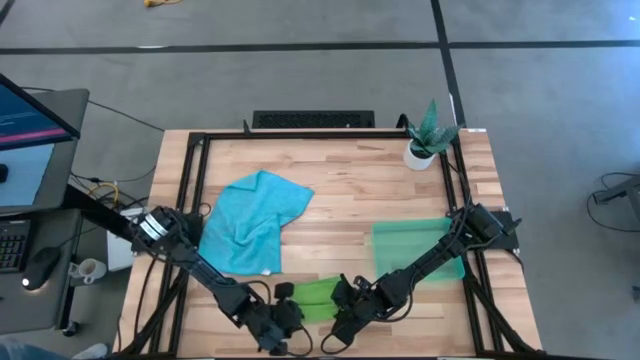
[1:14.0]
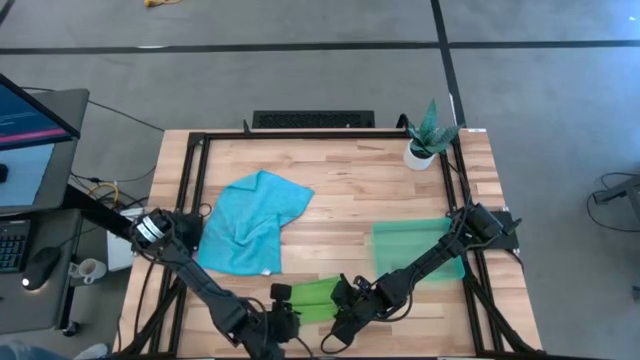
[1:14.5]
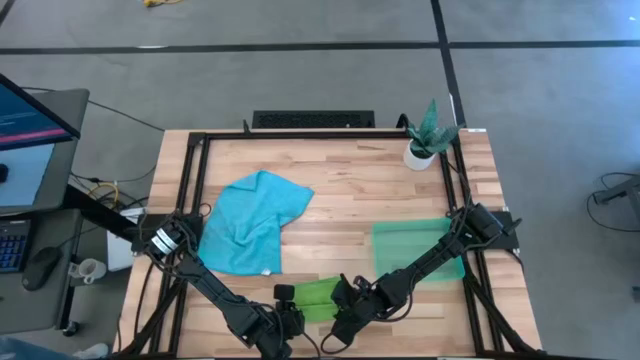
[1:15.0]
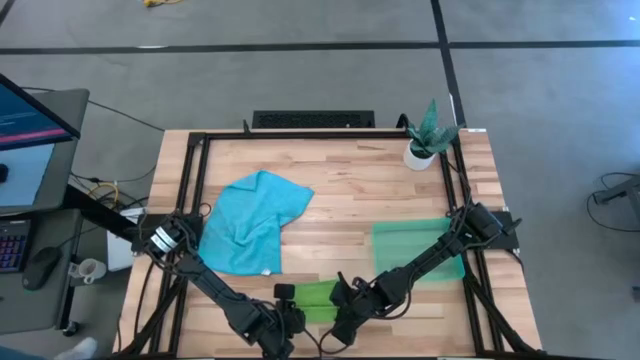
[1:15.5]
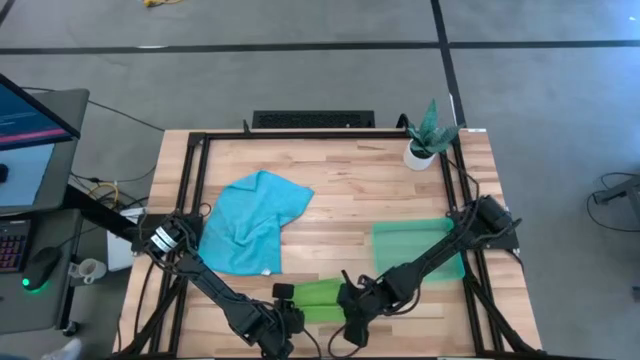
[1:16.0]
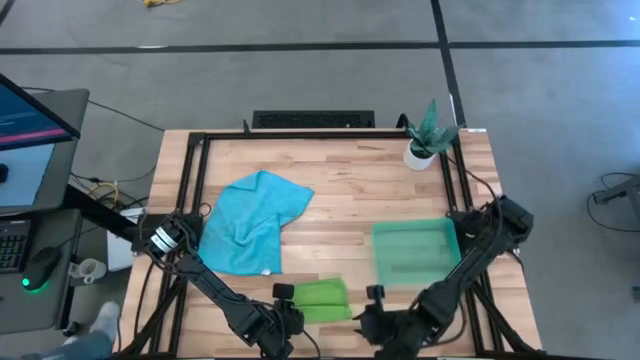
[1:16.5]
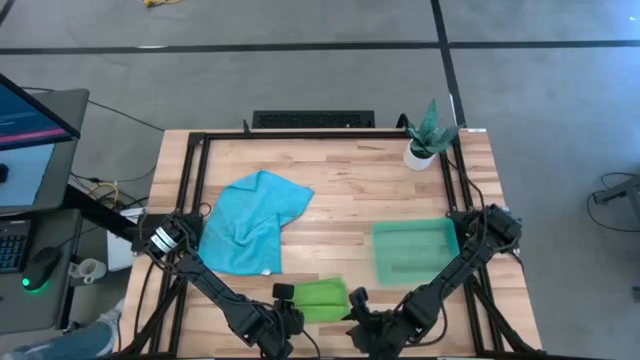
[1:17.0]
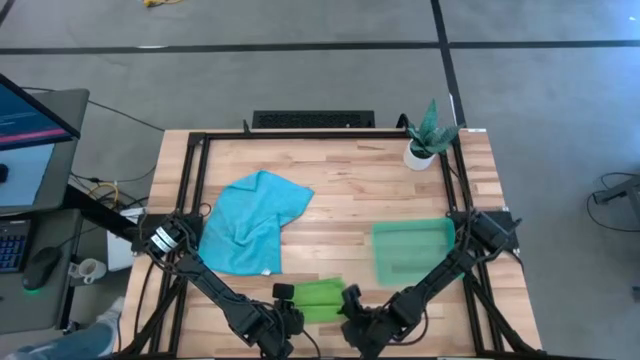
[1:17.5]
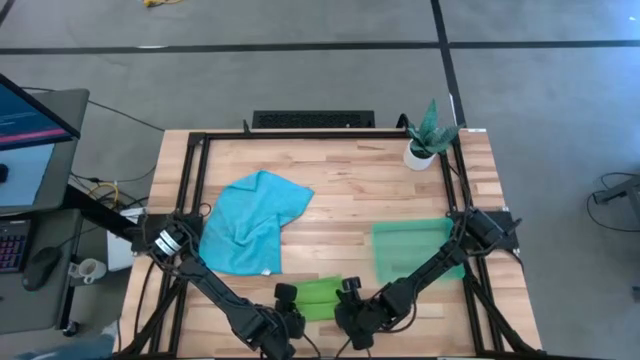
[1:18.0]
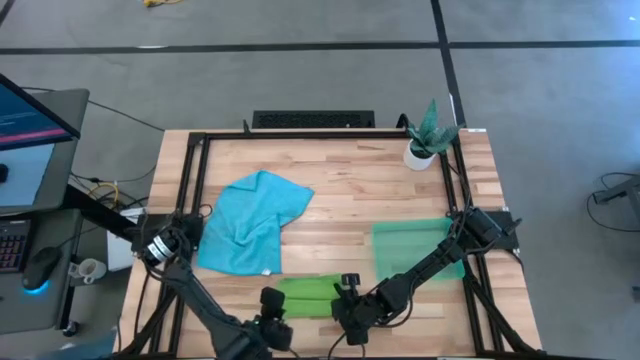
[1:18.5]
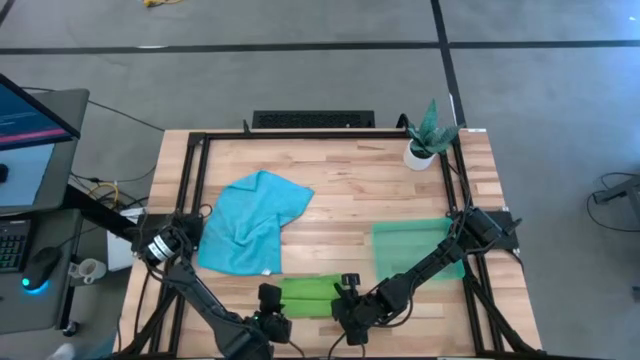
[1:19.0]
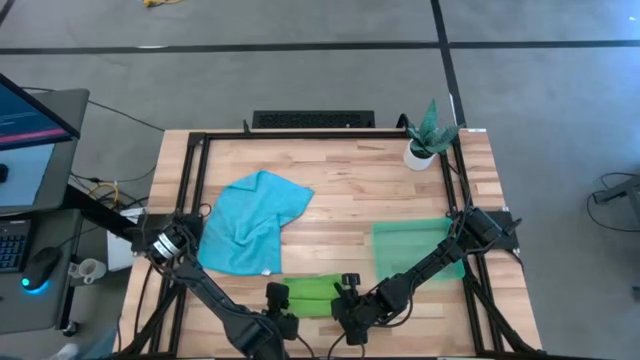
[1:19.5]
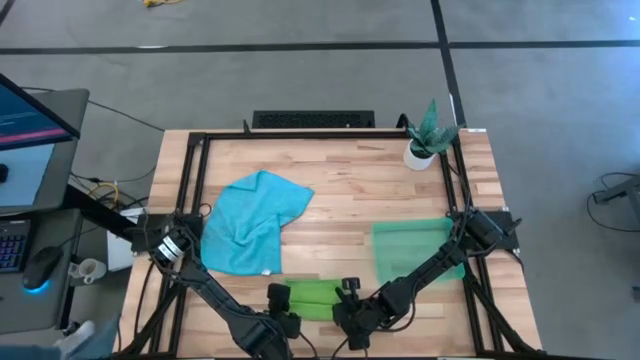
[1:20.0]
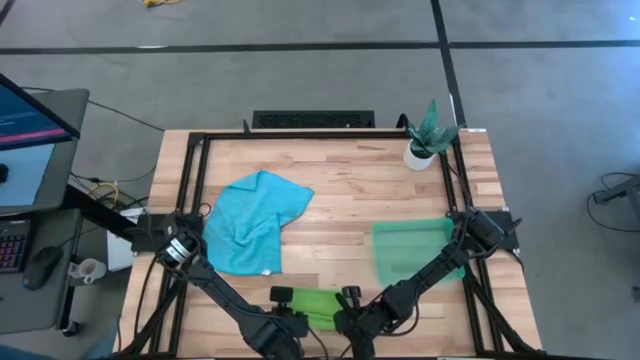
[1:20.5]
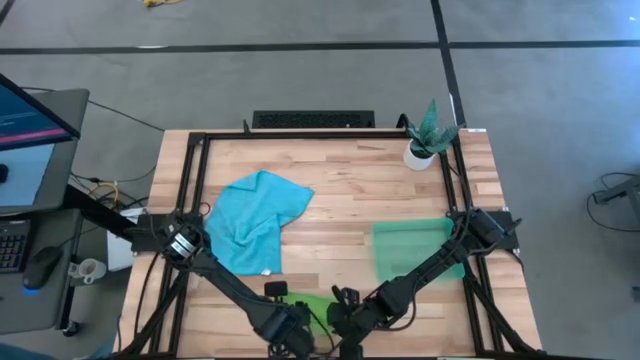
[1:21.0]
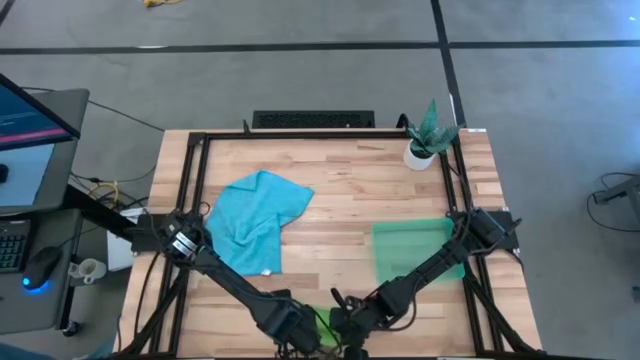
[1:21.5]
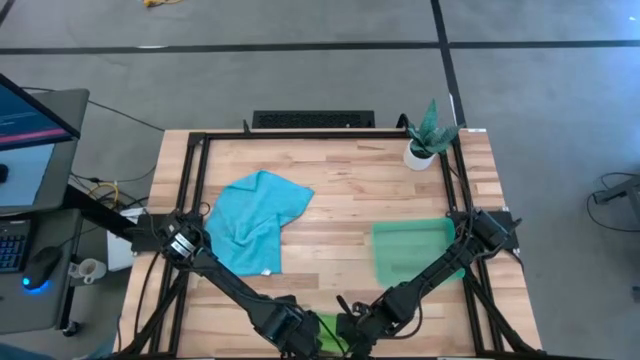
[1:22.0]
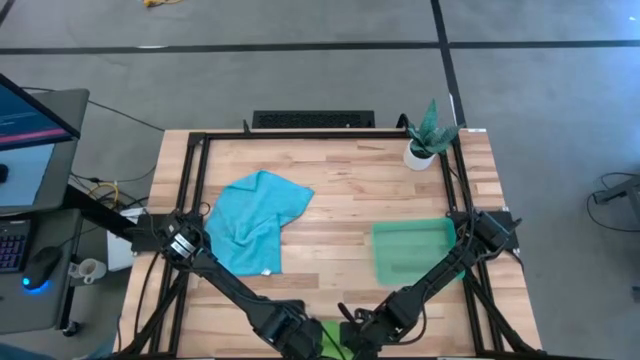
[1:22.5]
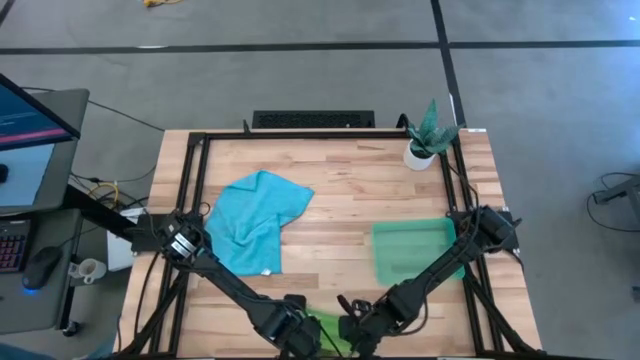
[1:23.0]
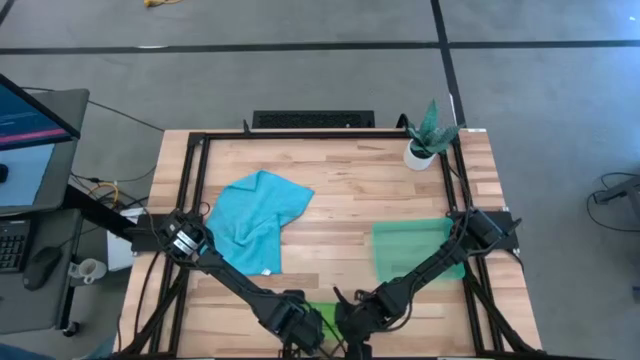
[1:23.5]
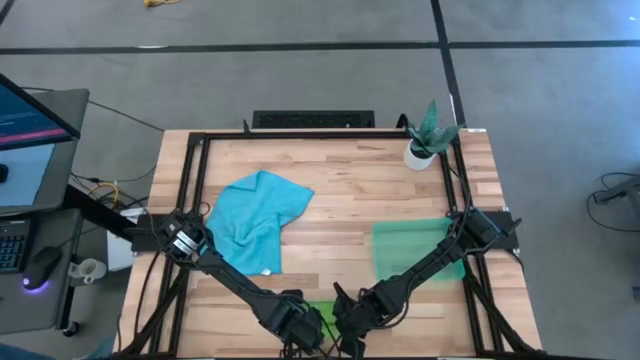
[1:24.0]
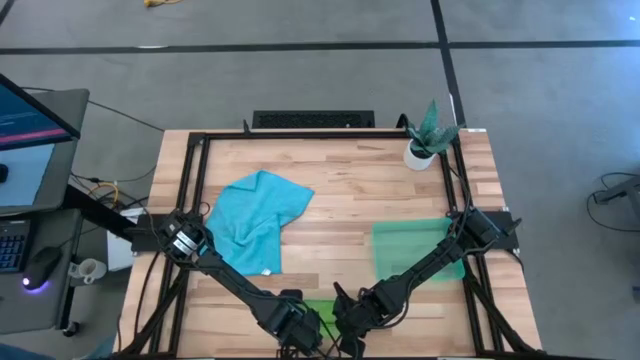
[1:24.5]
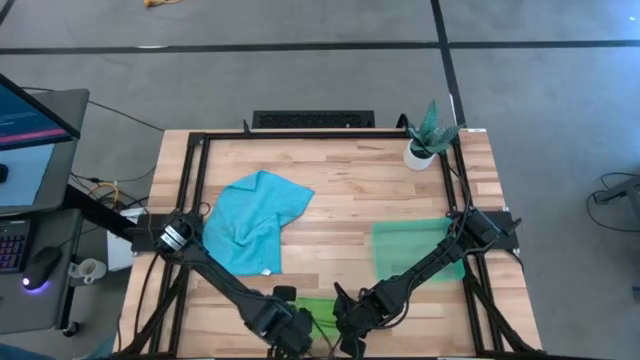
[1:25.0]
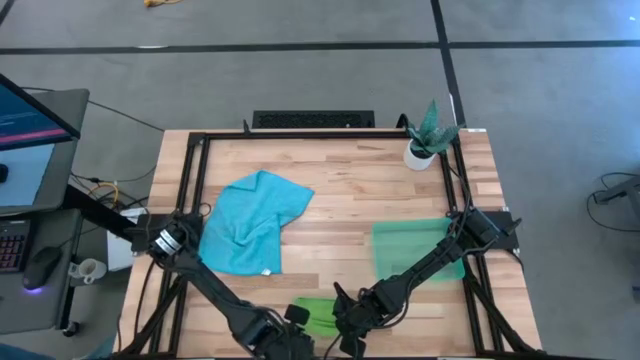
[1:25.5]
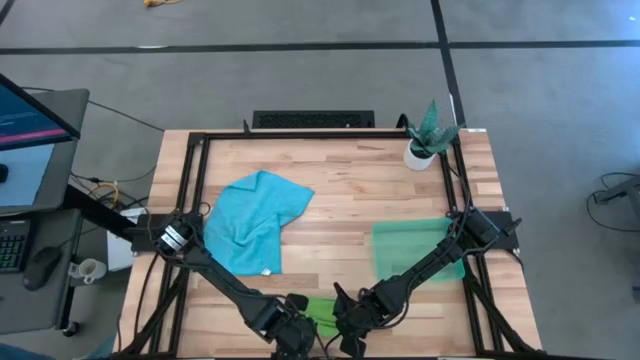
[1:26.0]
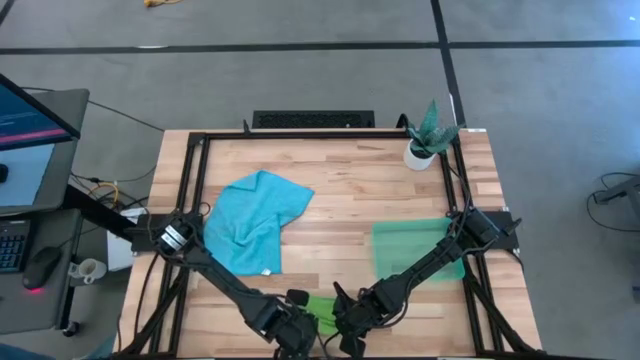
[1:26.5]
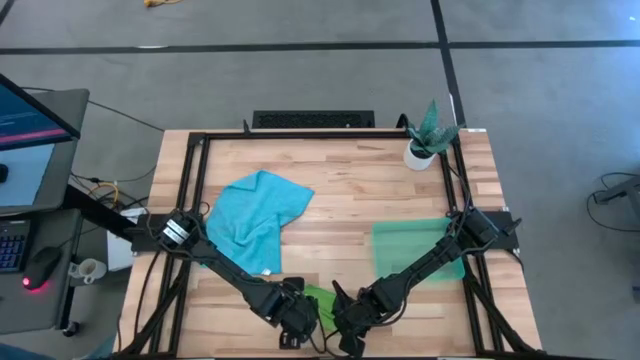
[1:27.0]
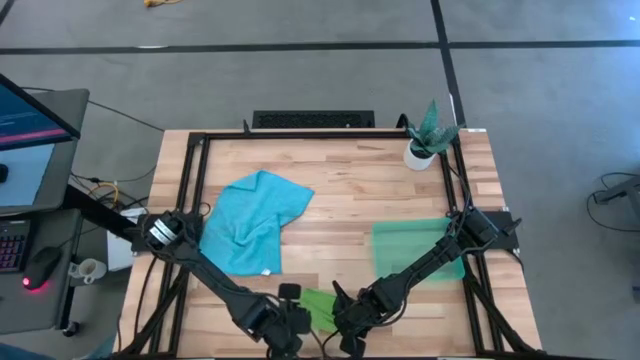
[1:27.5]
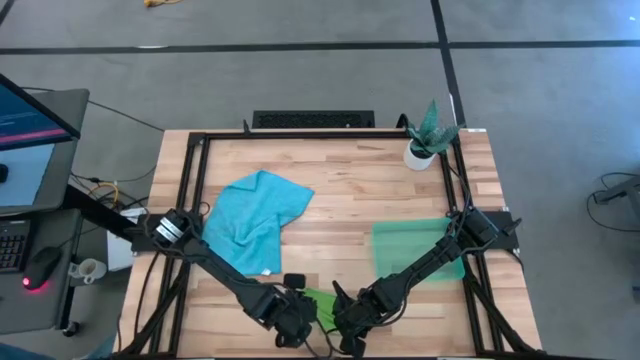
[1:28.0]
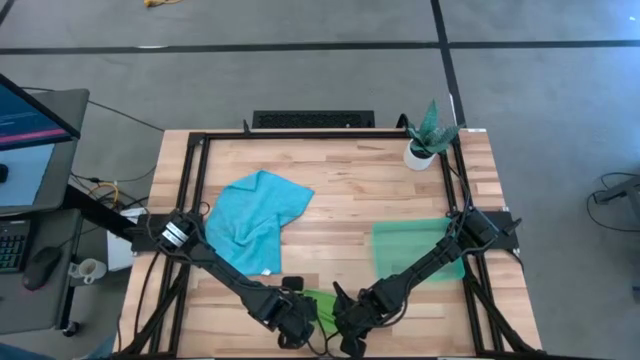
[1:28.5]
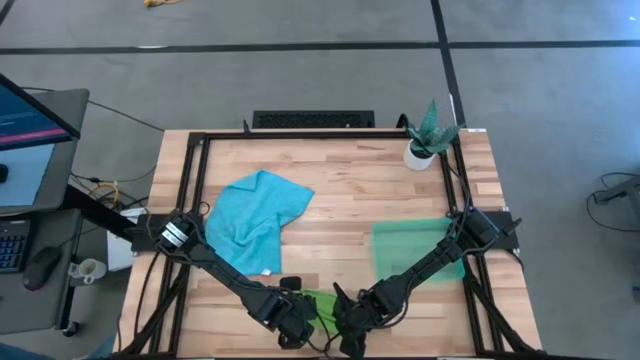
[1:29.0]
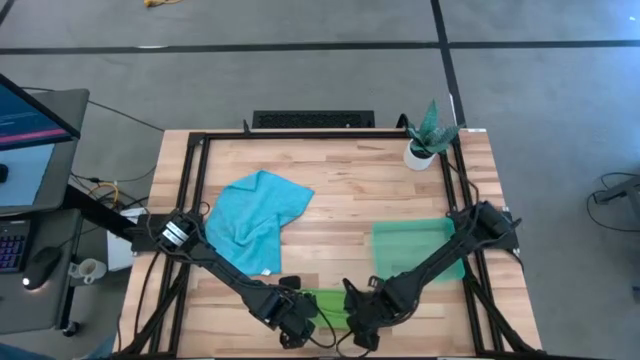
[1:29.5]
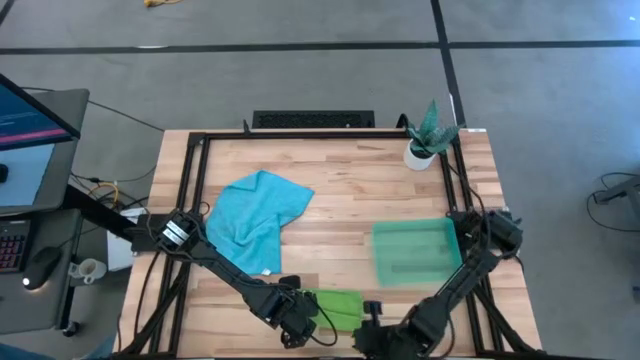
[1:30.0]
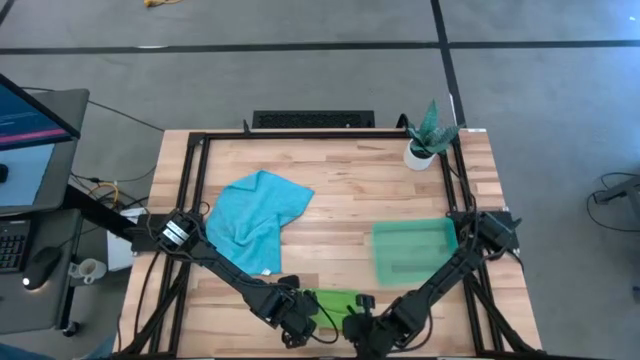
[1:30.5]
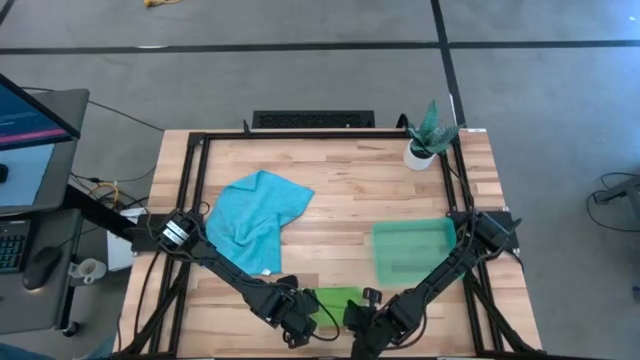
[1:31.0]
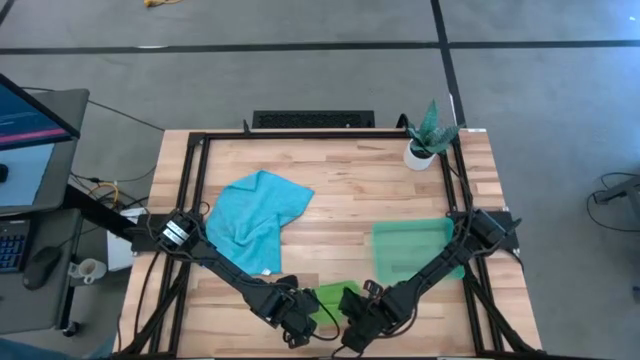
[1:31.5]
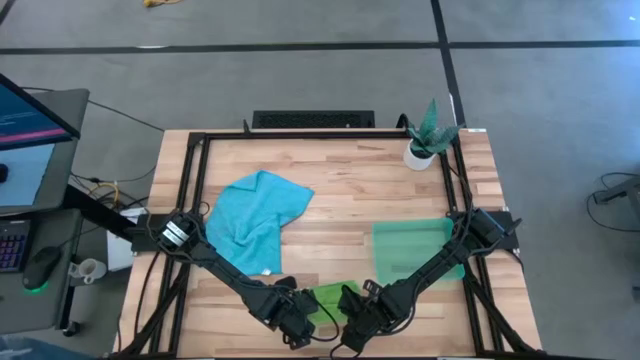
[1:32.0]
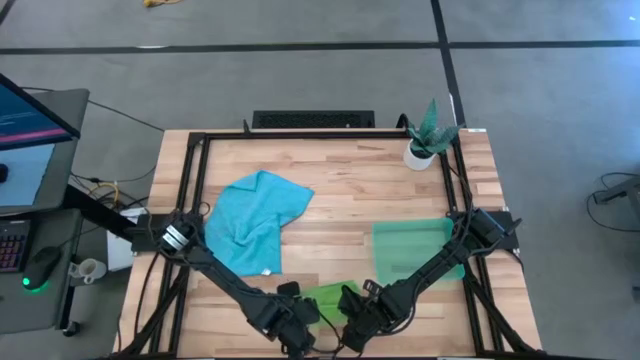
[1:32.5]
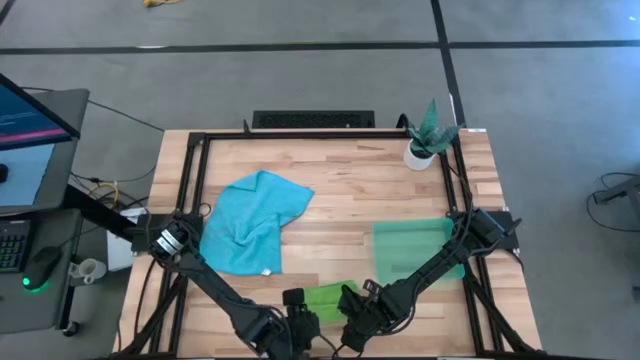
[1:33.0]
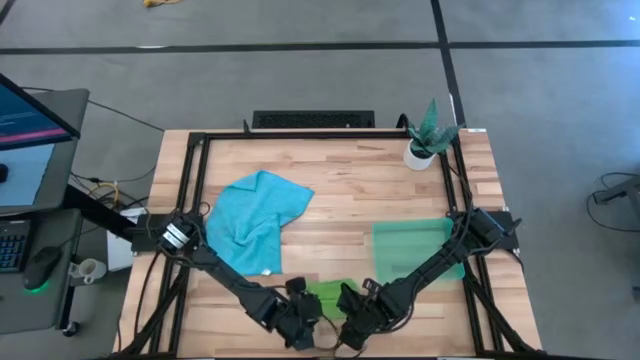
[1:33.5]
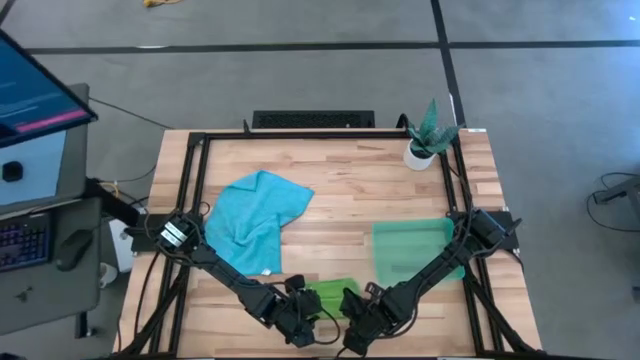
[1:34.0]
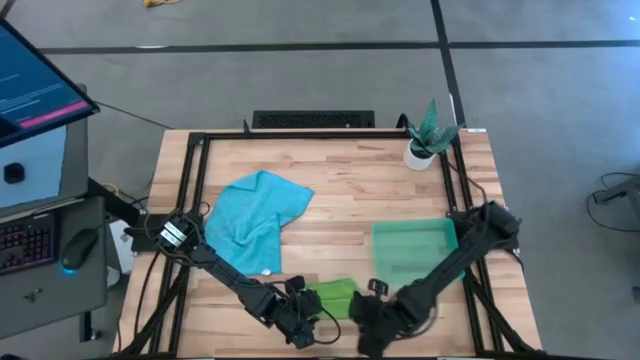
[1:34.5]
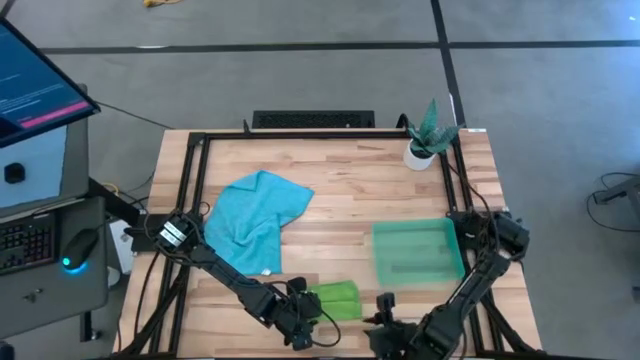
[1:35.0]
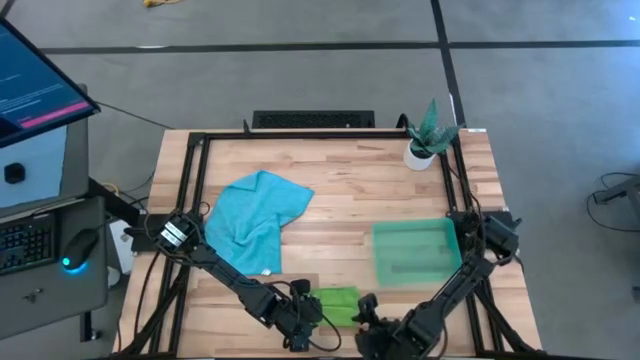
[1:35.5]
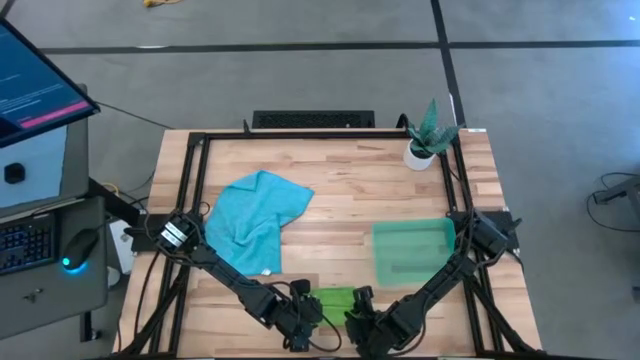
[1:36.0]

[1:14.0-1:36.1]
Task: Roll microfiber towels into tight, uniform cylinder then place into a basket
Roll the green towel
